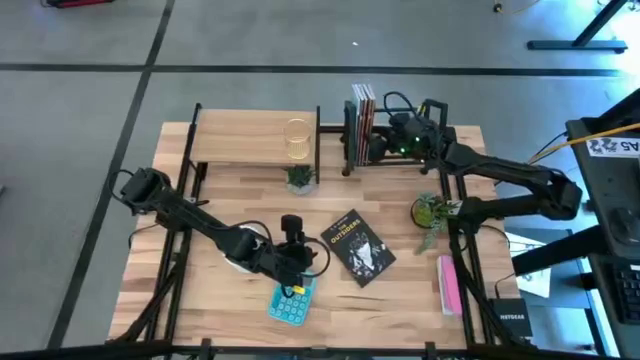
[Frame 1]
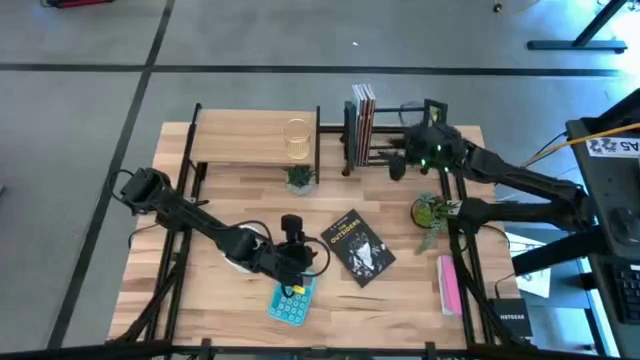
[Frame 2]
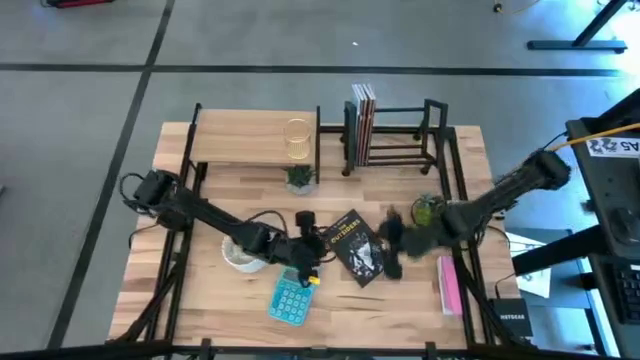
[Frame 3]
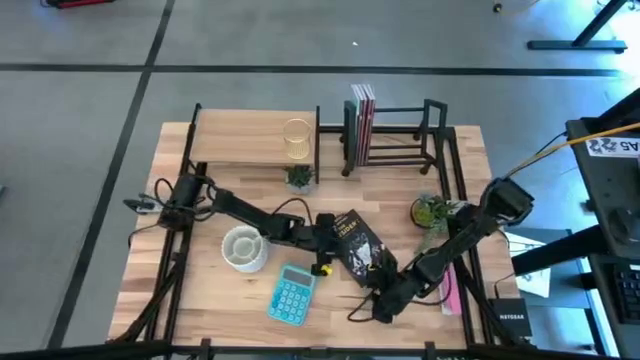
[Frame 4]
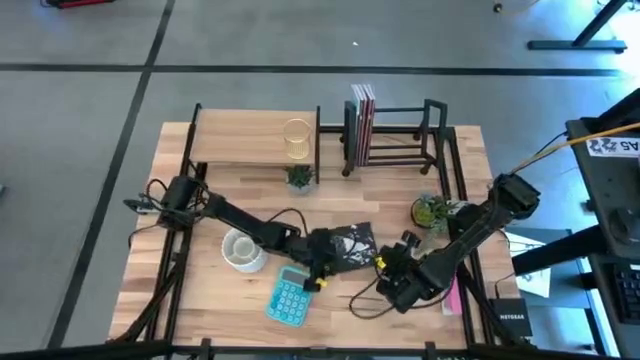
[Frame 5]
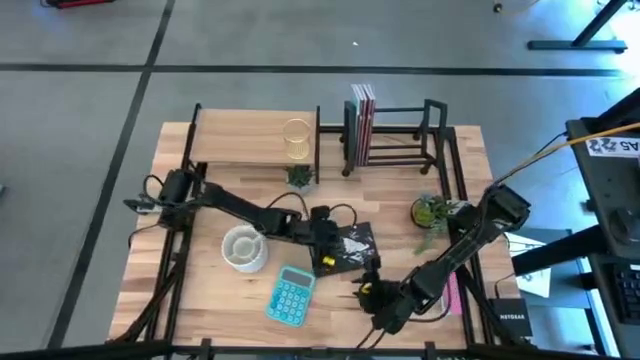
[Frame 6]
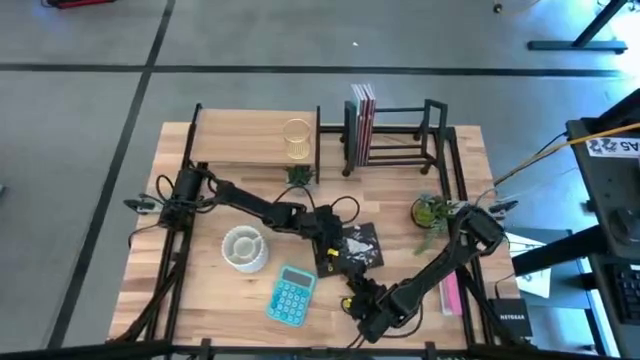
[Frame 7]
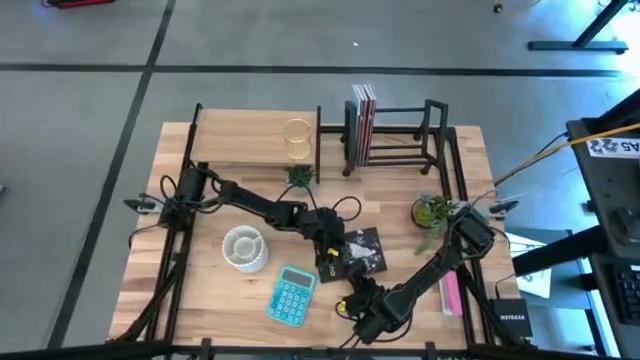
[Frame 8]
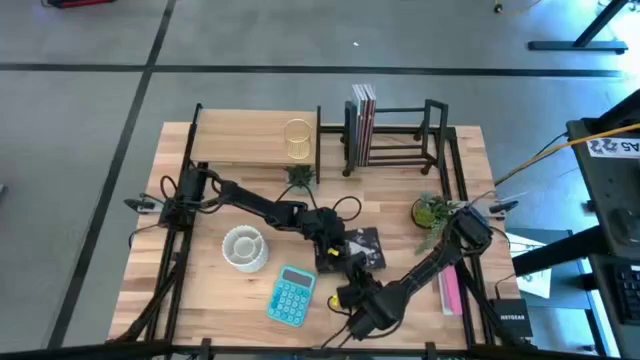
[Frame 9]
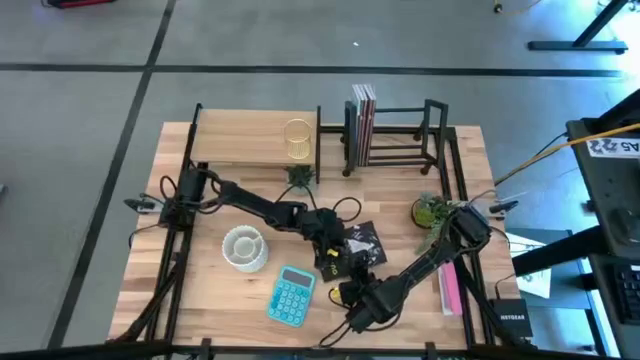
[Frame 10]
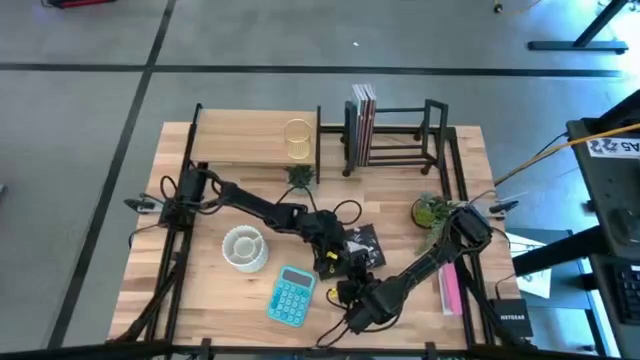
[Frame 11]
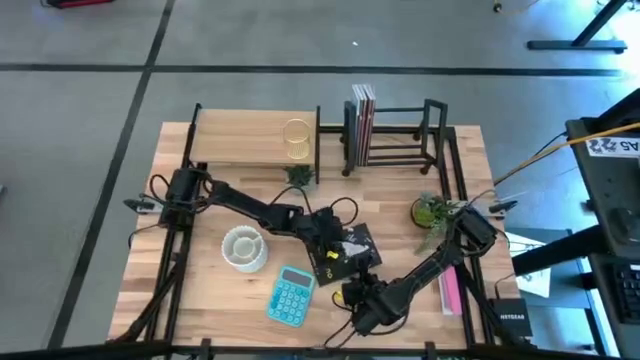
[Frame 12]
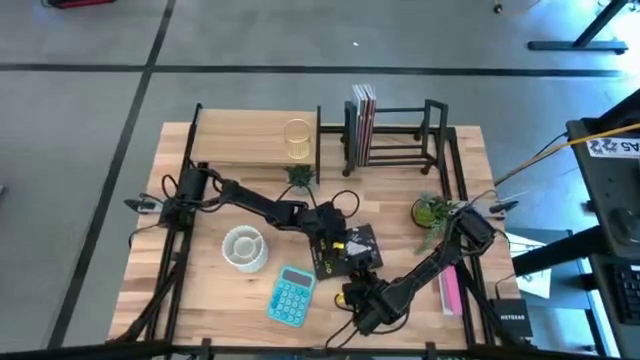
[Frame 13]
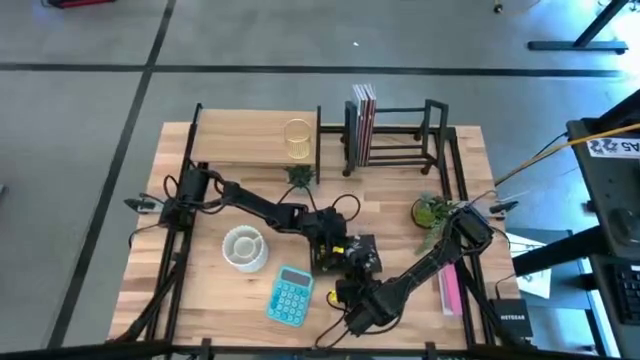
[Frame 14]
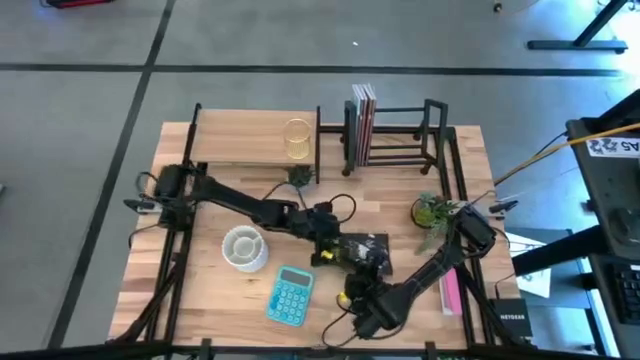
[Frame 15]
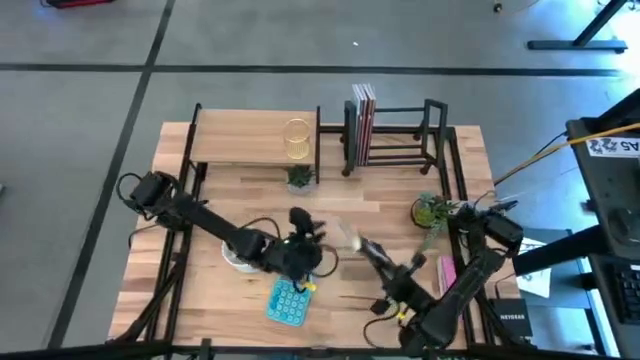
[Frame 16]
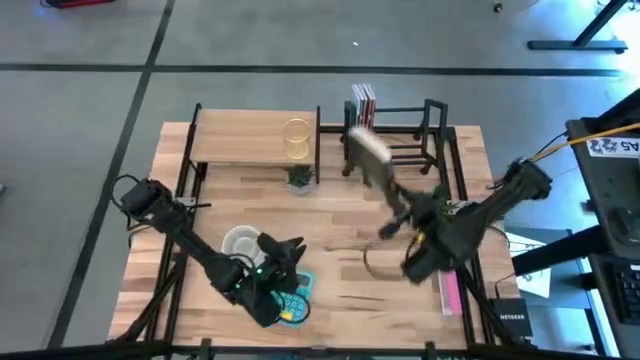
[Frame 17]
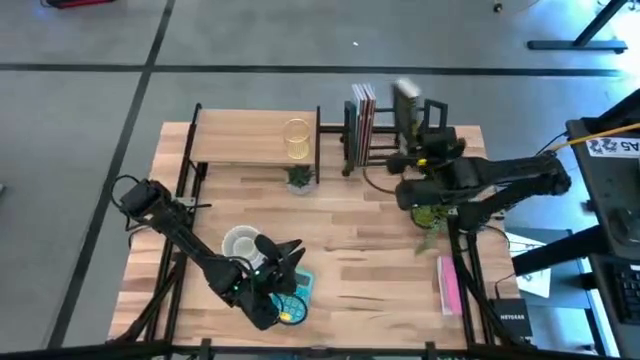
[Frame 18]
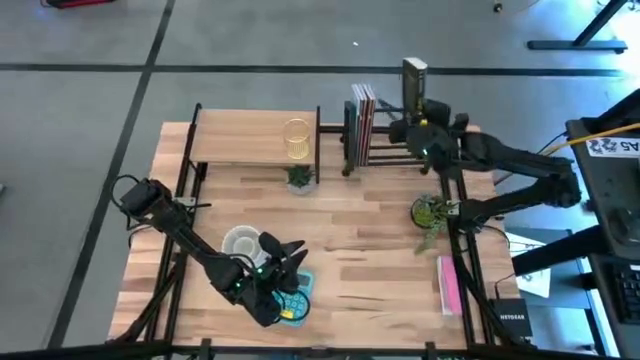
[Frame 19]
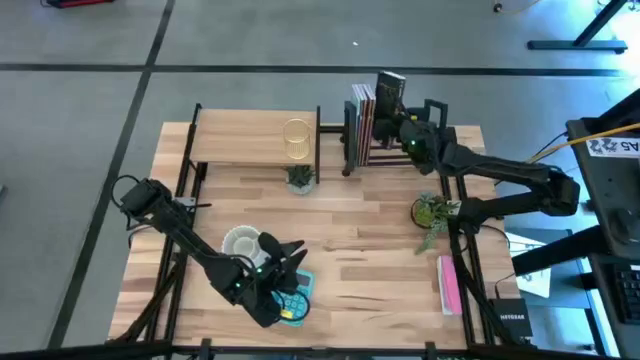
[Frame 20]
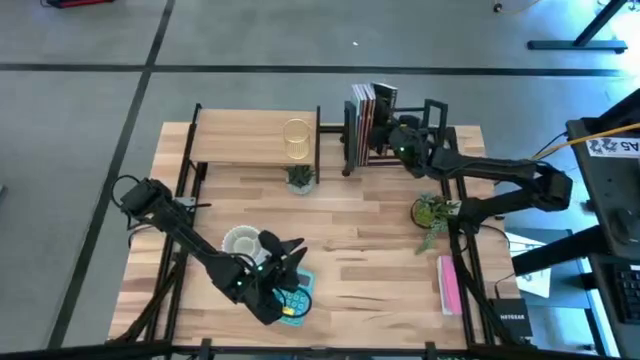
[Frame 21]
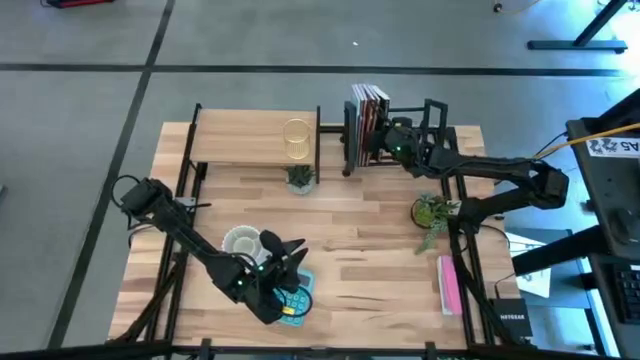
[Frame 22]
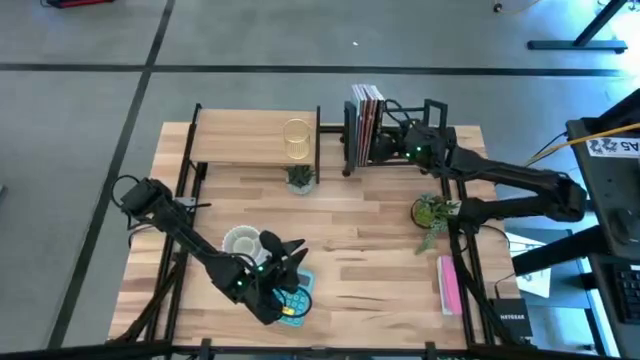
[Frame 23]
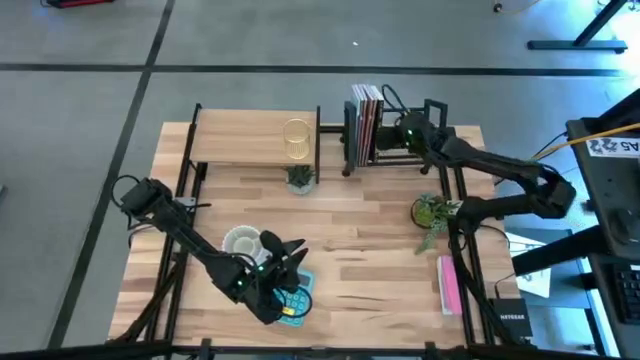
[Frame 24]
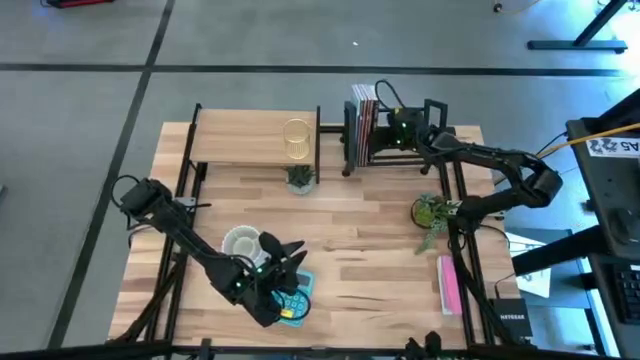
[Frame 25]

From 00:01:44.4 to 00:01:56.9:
Task: Stock shelves
Put the black book on the book shelf

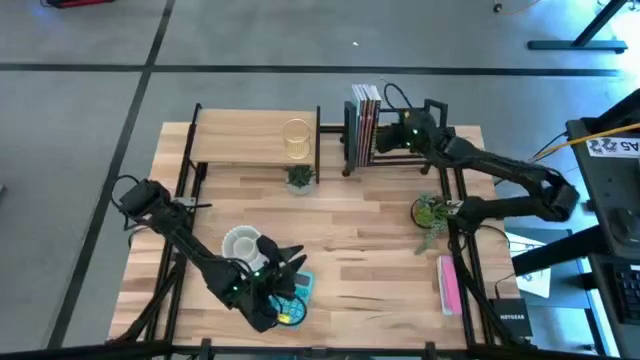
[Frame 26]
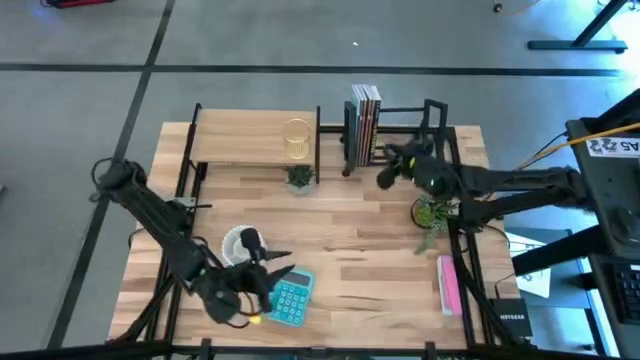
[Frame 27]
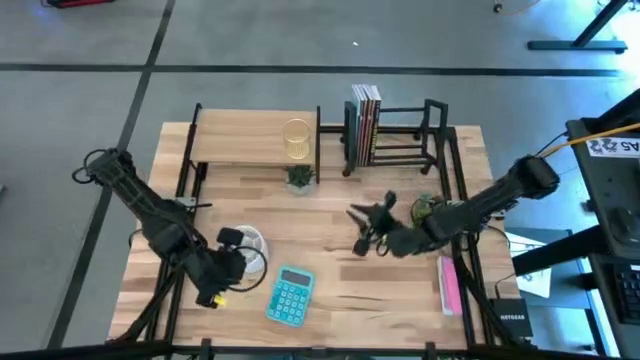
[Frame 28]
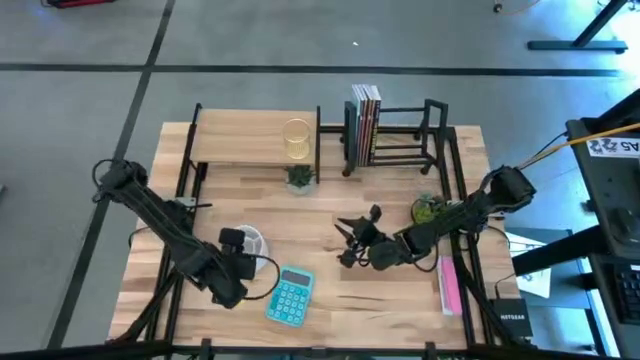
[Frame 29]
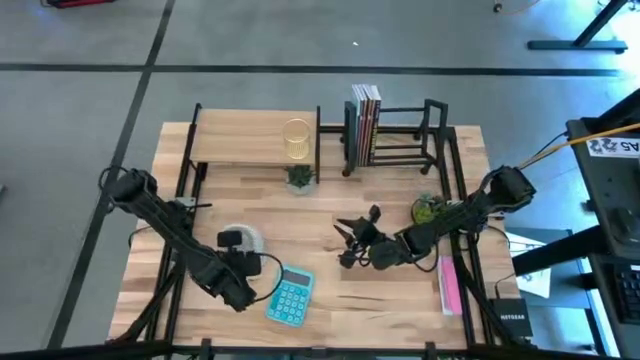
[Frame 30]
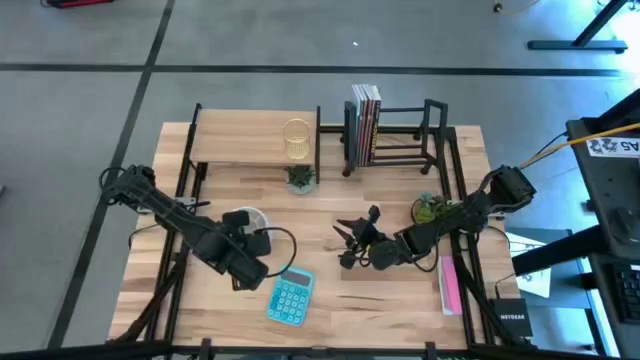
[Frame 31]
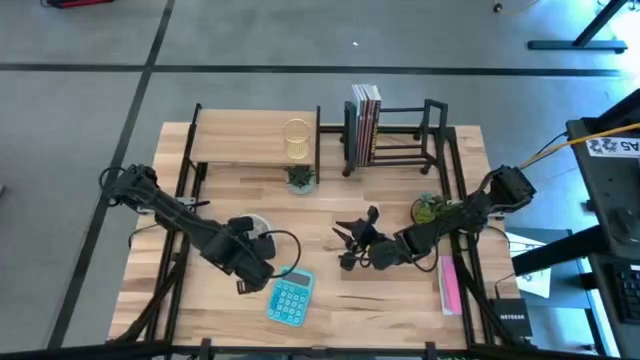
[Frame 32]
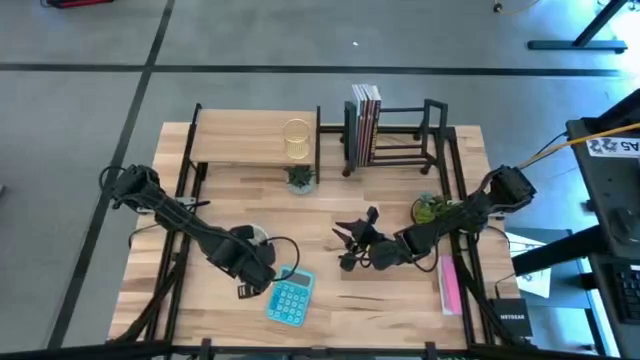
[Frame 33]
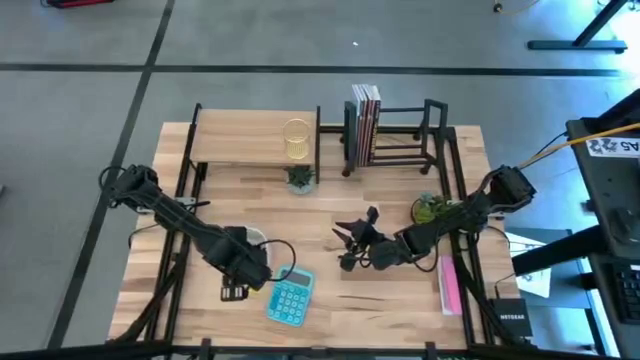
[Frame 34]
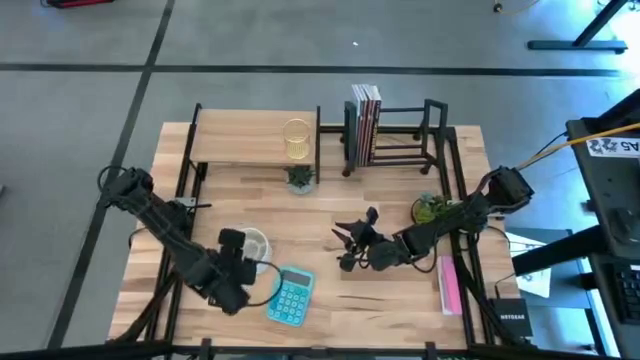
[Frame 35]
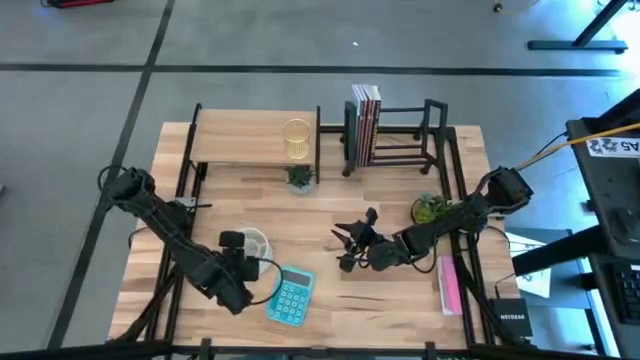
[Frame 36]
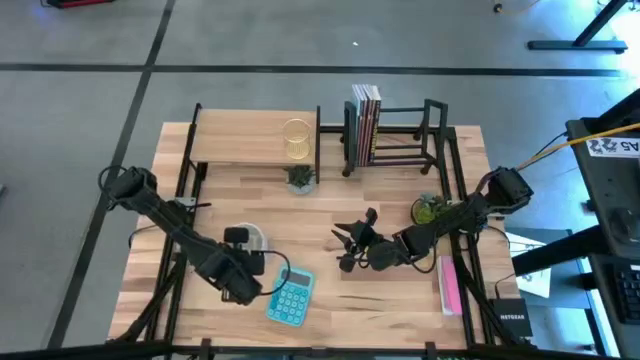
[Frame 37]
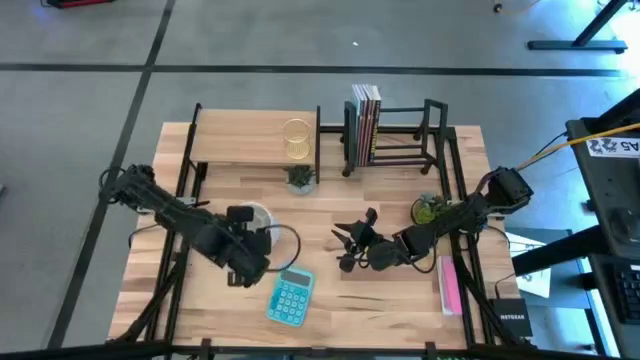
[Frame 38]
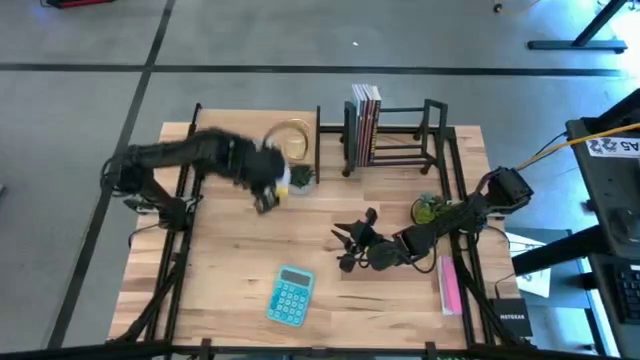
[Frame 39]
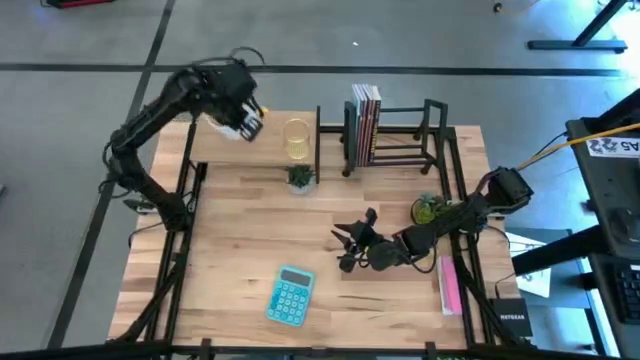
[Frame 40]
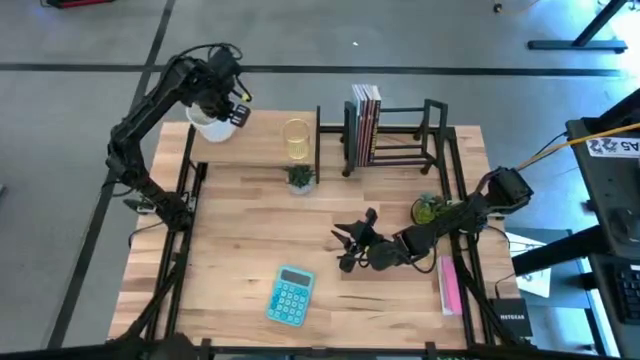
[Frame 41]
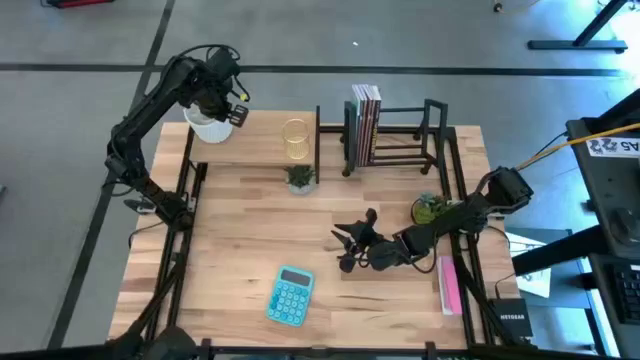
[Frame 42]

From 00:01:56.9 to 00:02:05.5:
Put the white pen holder on the shelf
